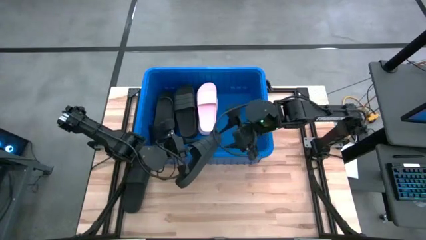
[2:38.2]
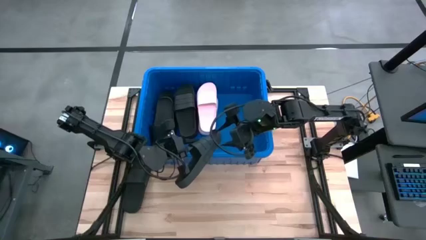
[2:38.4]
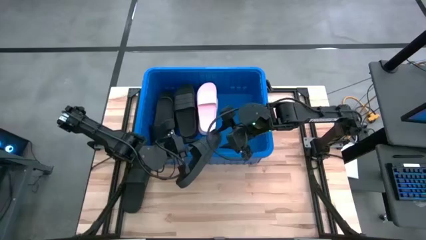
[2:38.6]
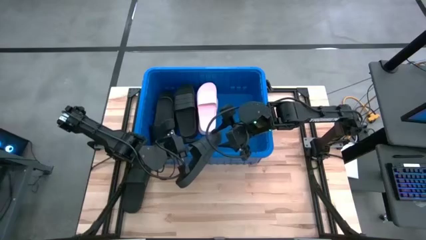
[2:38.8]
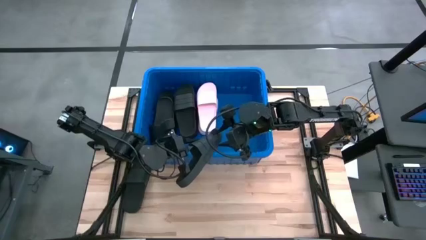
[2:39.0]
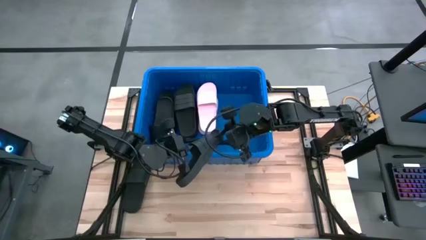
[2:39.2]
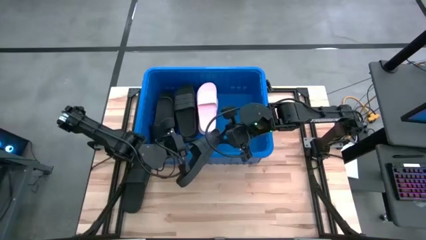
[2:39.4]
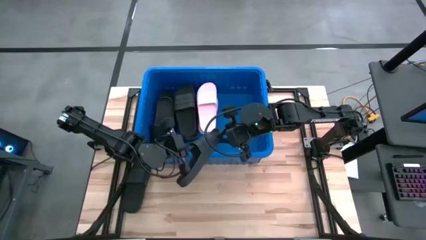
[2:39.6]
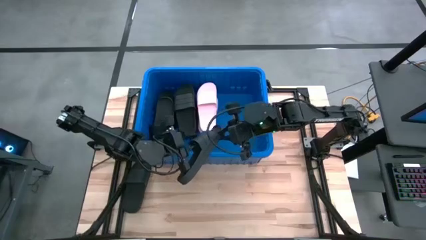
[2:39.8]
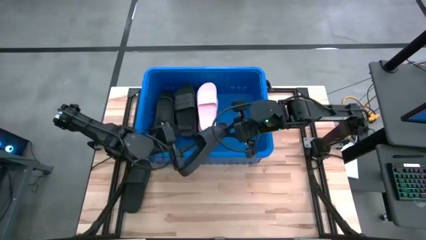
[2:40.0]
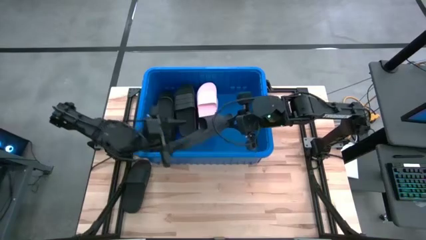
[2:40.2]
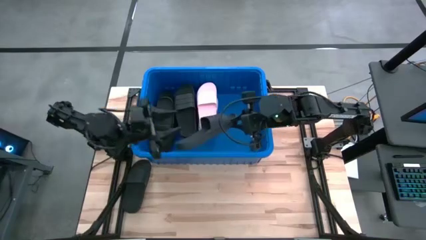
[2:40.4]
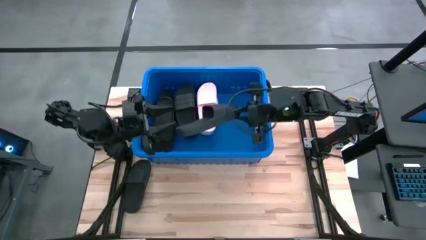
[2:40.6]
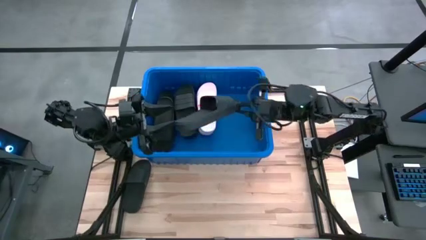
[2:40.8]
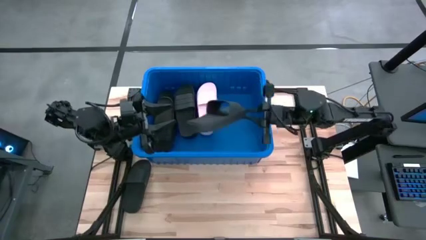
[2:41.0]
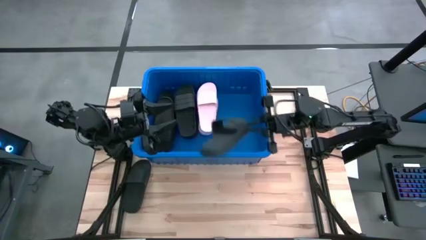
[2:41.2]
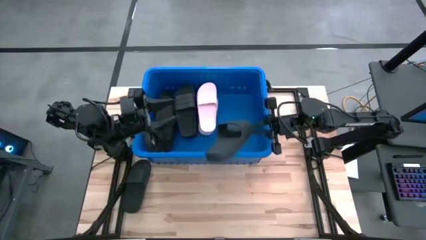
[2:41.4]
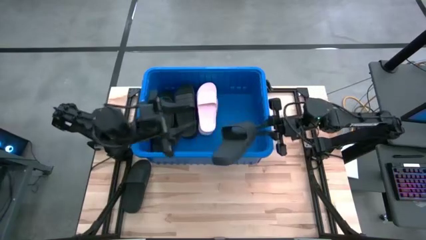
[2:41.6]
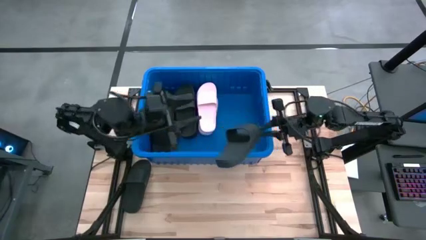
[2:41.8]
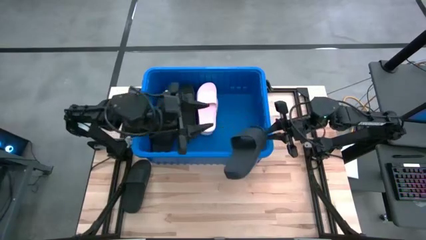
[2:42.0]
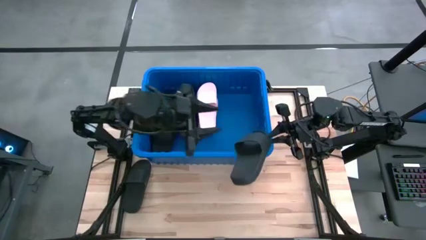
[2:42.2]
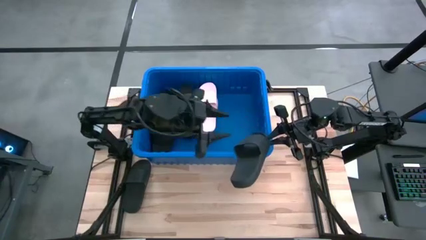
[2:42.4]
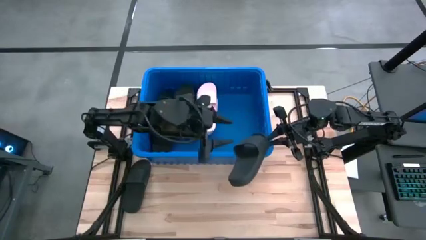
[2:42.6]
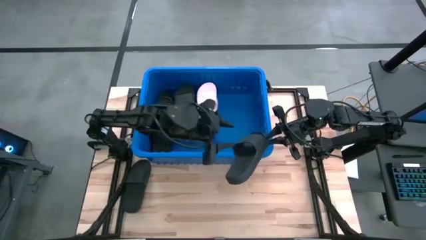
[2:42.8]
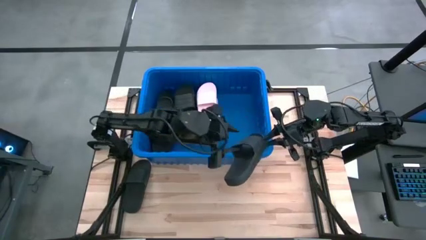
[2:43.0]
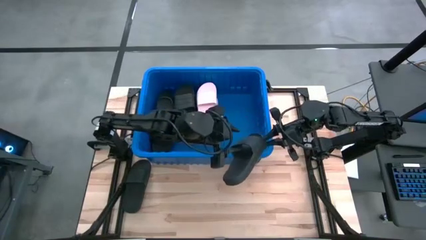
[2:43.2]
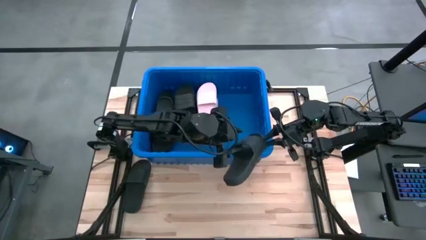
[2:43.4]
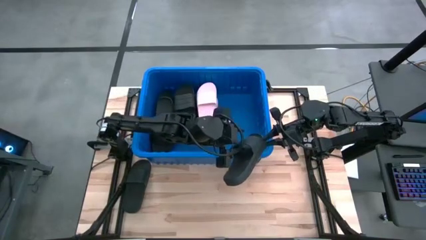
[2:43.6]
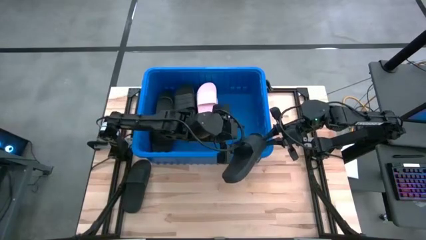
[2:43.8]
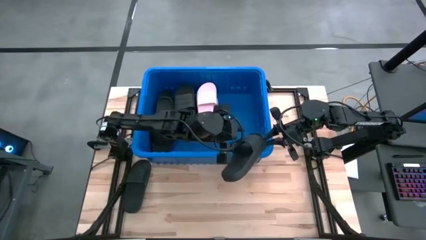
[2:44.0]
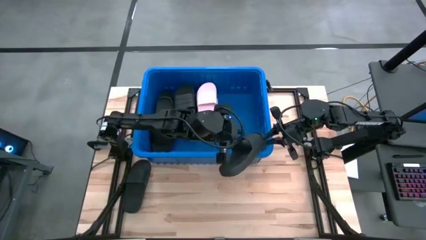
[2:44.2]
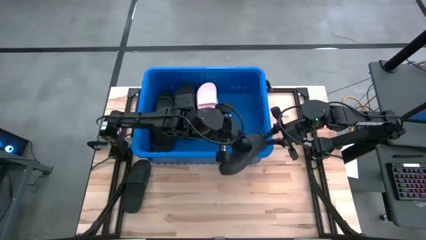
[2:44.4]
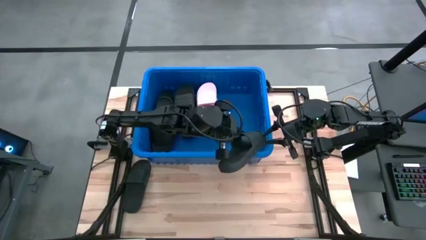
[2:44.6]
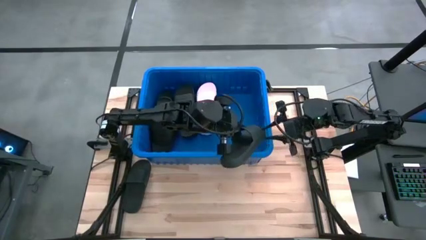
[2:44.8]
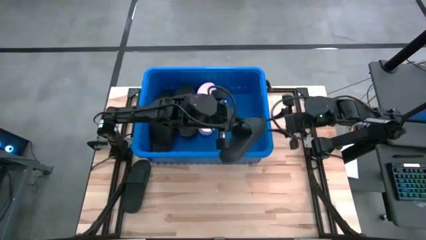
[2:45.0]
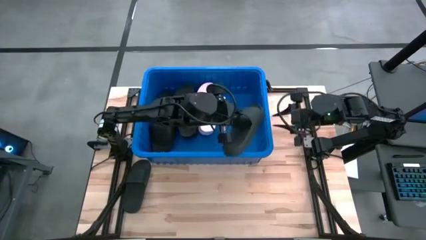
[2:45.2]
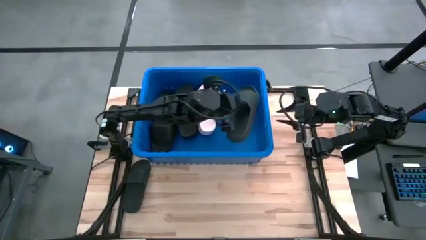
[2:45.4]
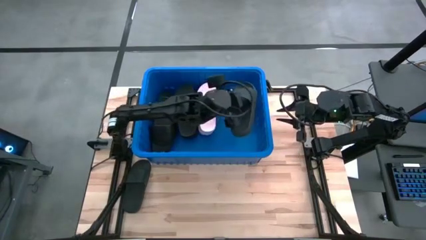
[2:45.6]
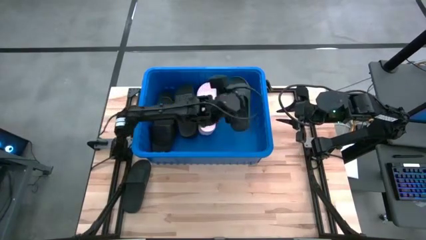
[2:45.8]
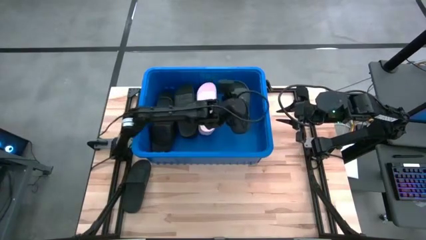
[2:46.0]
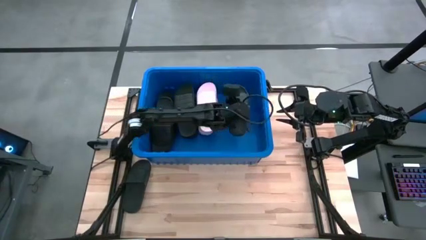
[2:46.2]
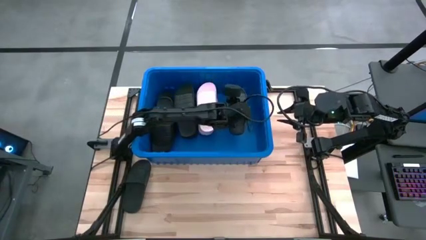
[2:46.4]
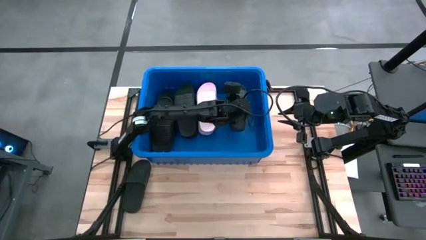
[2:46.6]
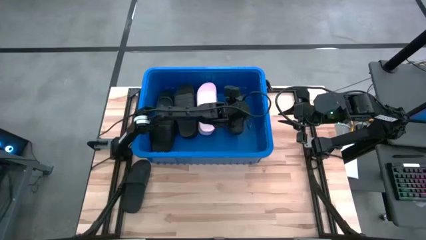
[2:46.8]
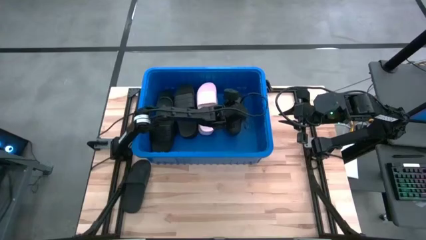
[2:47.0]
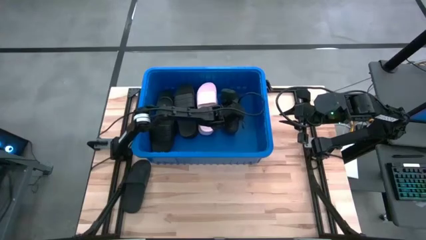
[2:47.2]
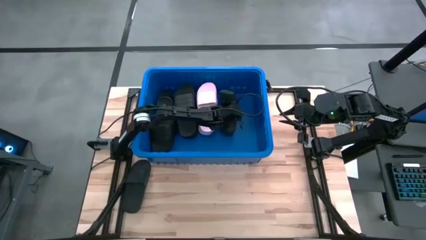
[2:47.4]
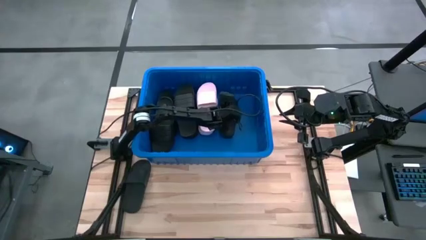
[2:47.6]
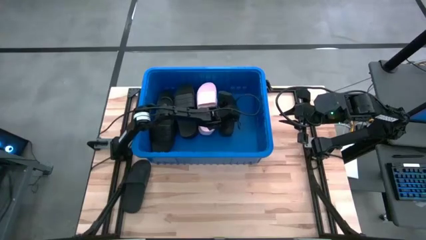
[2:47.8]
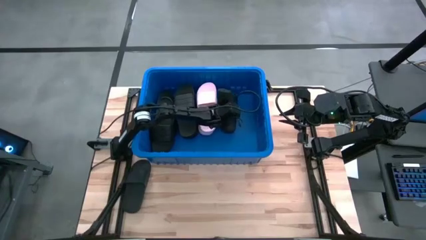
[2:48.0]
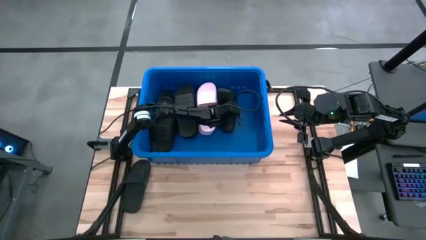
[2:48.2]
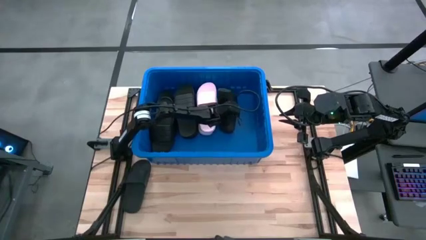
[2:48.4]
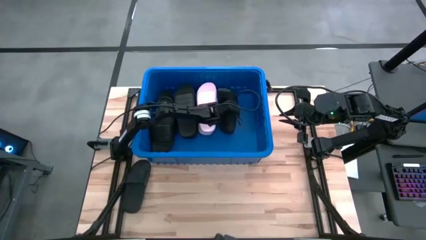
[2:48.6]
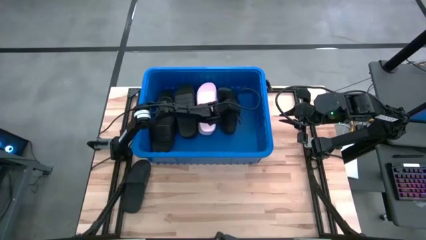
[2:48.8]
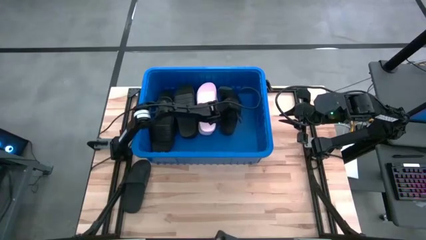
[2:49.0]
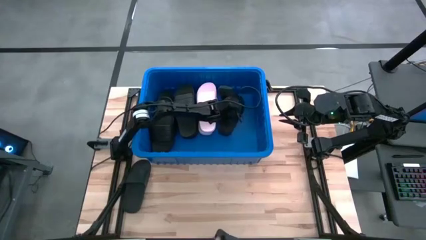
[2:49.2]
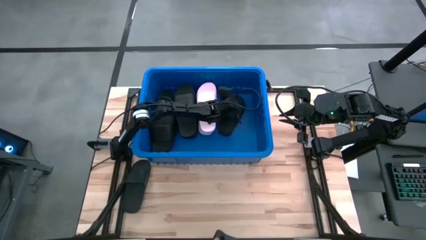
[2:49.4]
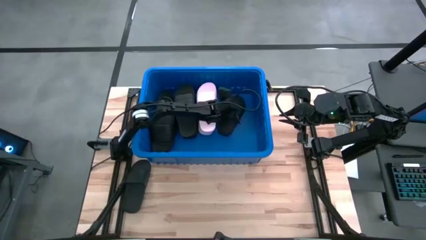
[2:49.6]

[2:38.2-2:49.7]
Task: Pick and place slides into bin
Put the right black slide into the blue container

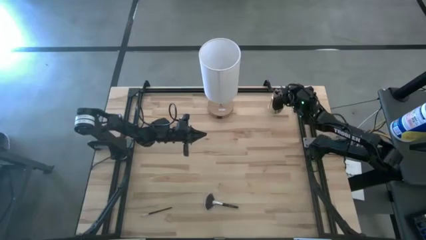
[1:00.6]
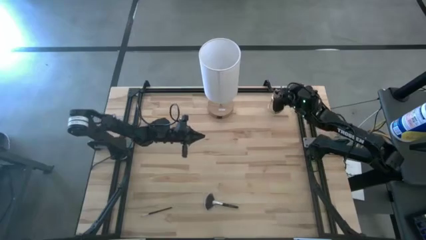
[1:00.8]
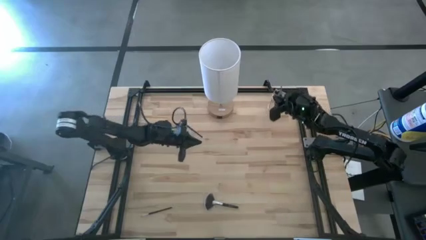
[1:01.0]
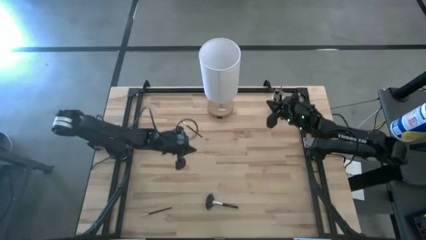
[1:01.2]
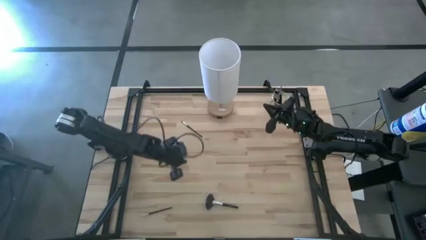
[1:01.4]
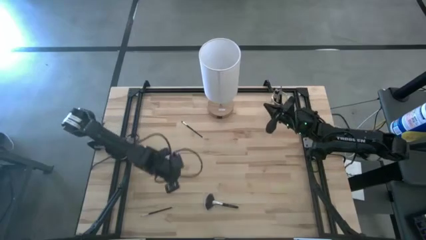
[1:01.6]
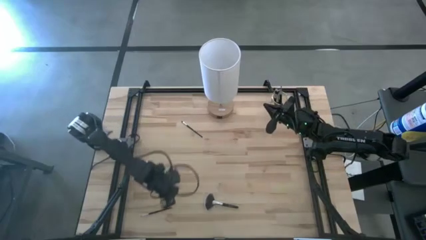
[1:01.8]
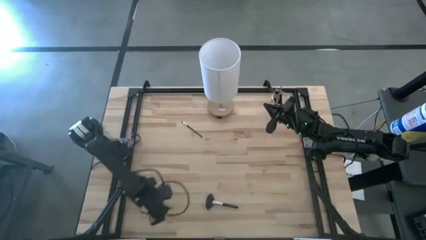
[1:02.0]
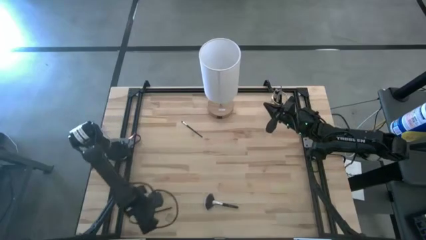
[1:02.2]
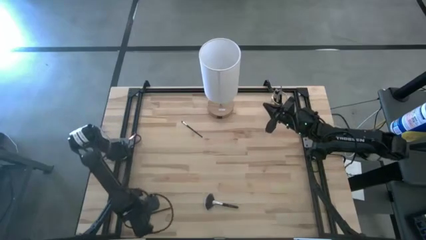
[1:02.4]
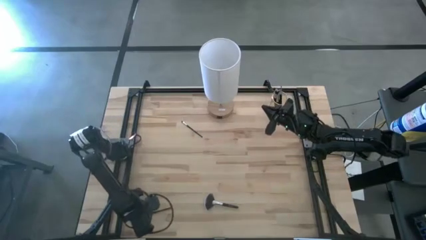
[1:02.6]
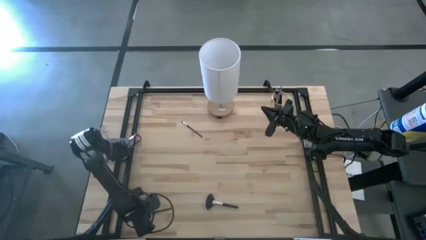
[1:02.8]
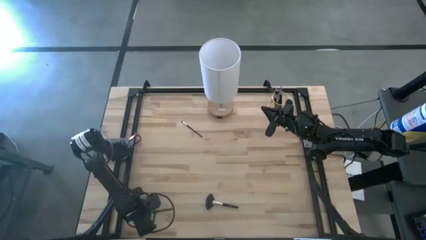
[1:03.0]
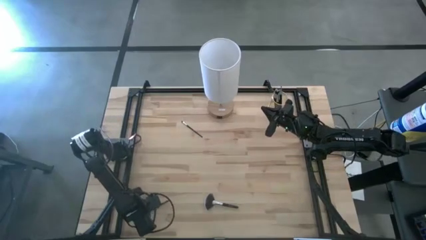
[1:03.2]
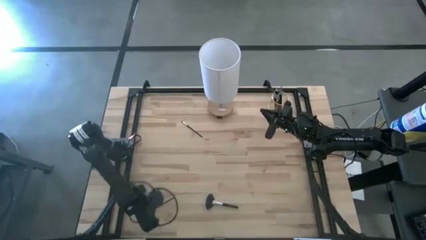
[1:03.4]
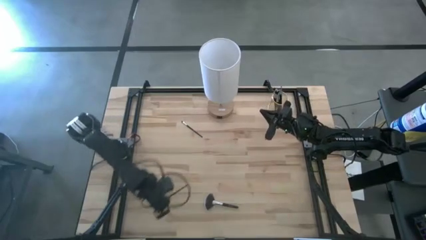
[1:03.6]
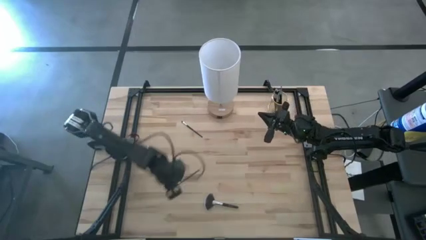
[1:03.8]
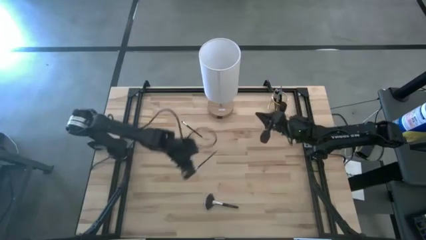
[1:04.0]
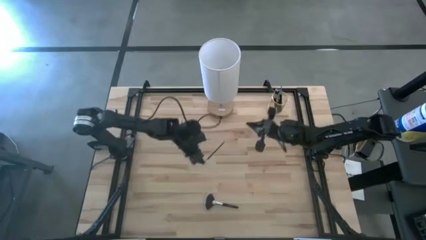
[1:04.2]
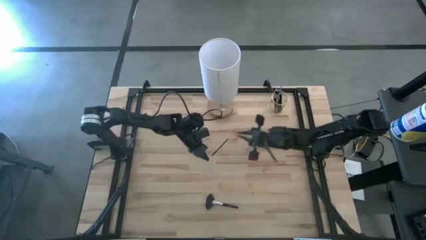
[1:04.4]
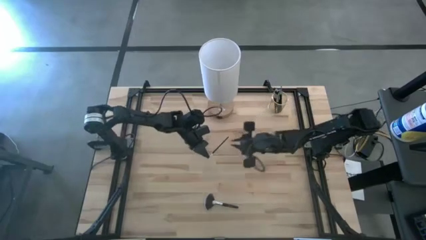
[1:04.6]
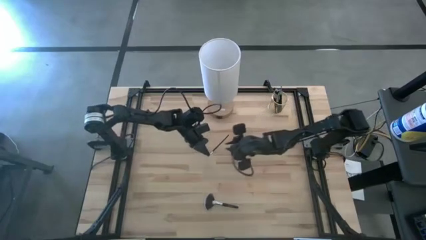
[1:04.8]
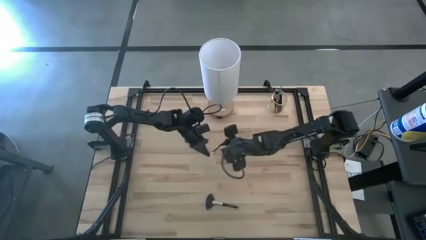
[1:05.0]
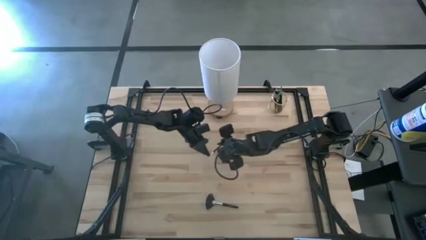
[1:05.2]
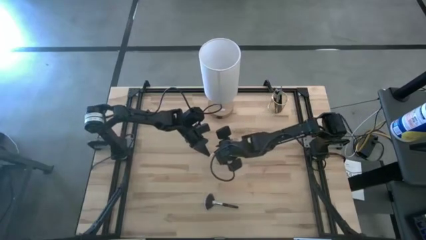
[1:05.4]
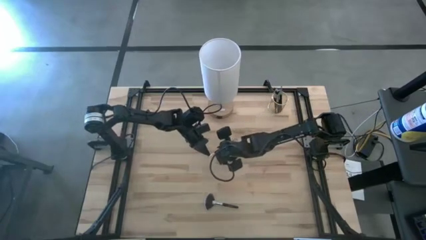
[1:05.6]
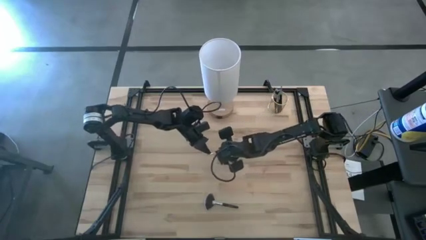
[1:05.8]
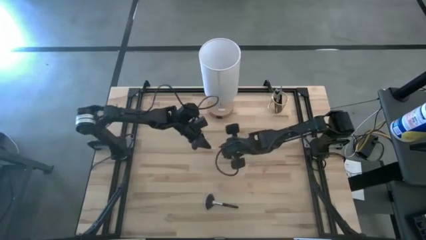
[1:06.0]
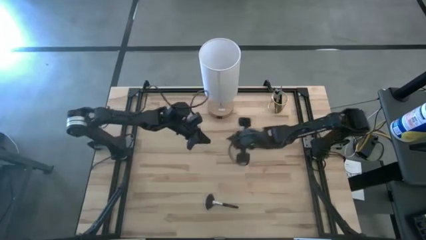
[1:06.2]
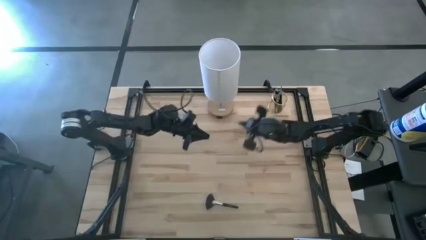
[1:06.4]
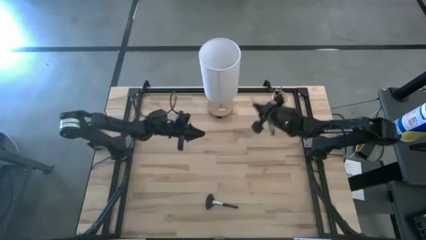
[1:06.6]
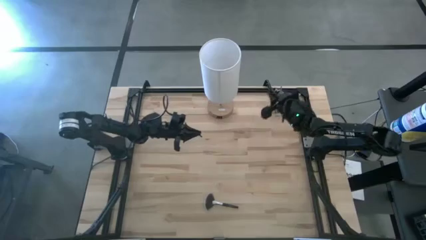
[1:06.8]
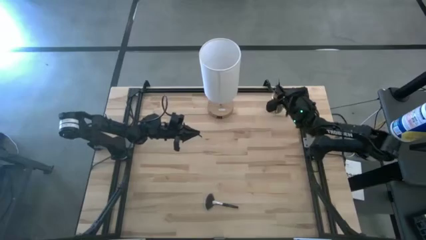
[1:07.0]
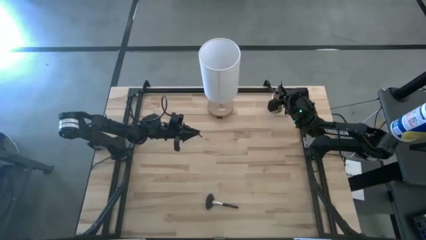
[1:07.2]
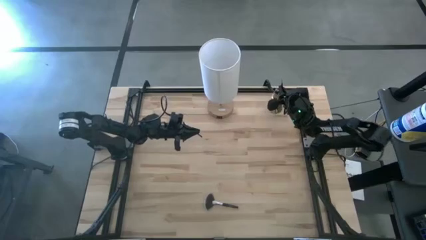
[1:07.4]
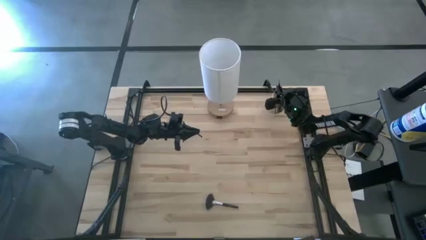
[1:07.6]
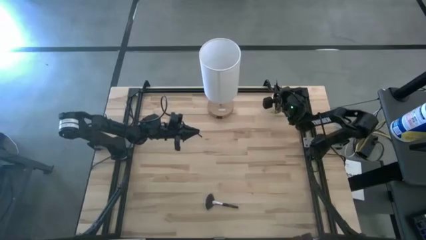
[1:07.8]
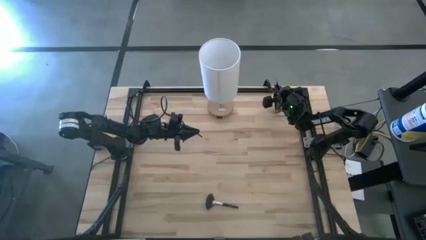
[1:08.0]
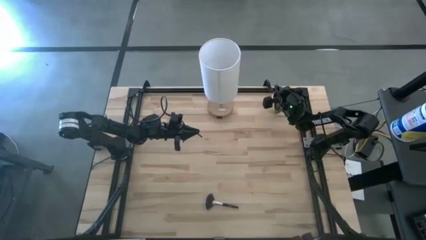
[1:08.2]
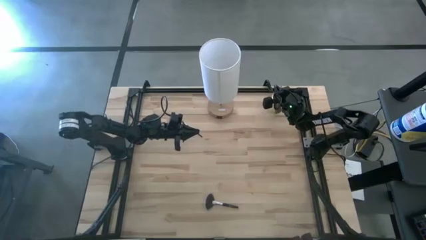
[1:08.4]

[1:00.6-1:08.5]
Task: Pick & Place Makeup Brushes
Put the liner brush into the makeup brush holder
